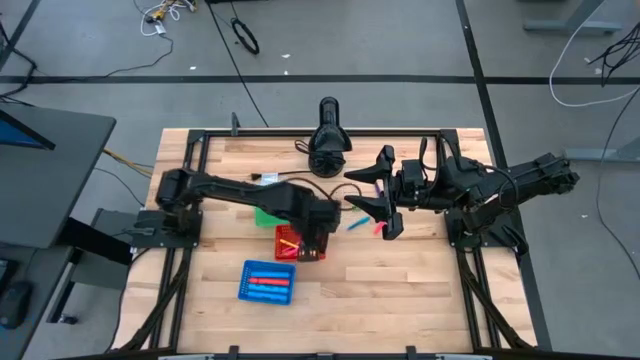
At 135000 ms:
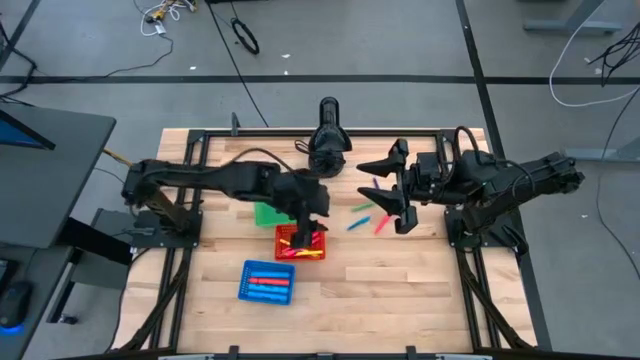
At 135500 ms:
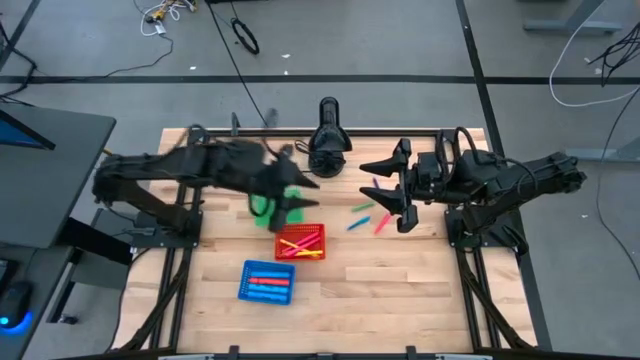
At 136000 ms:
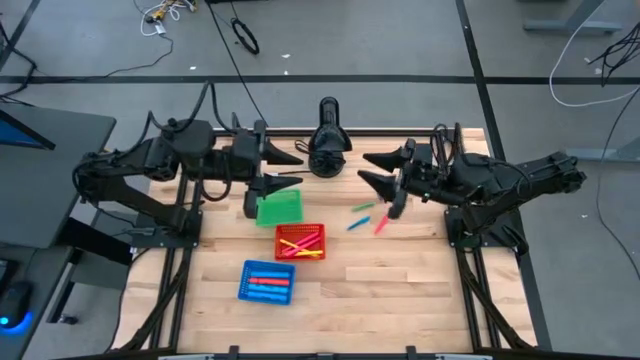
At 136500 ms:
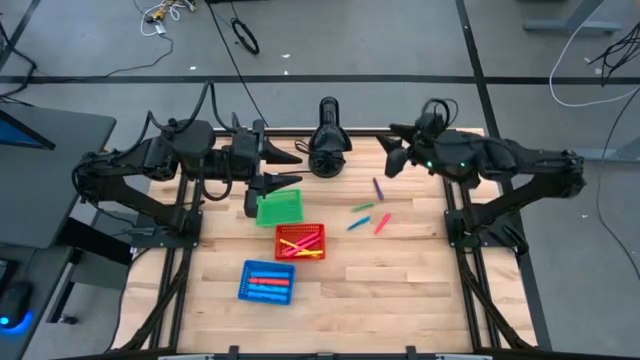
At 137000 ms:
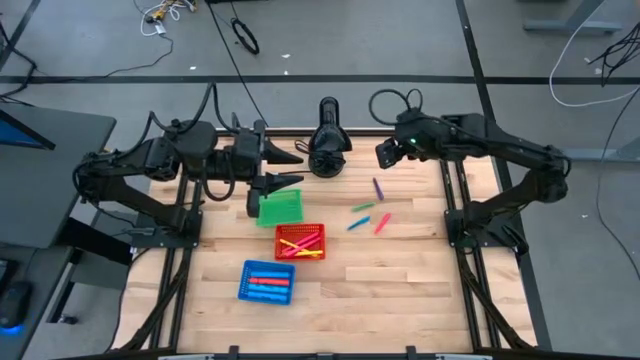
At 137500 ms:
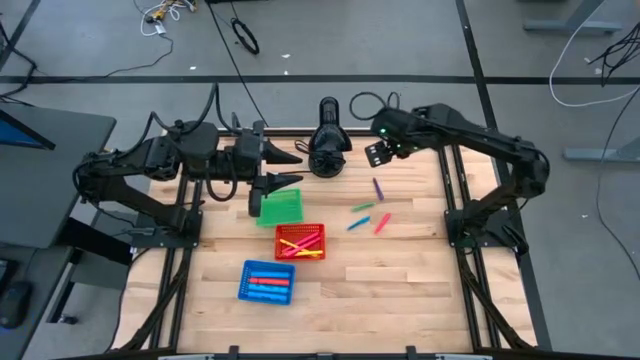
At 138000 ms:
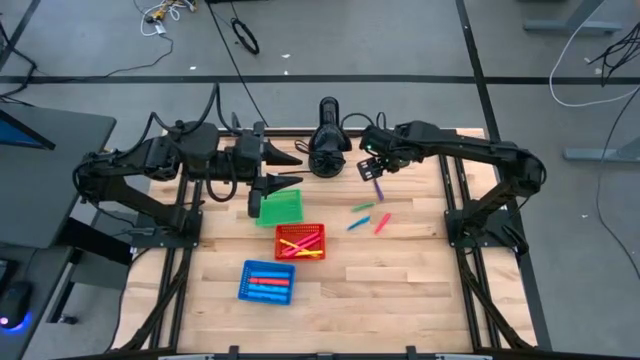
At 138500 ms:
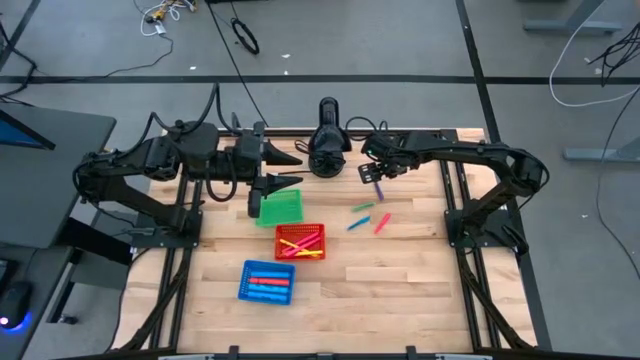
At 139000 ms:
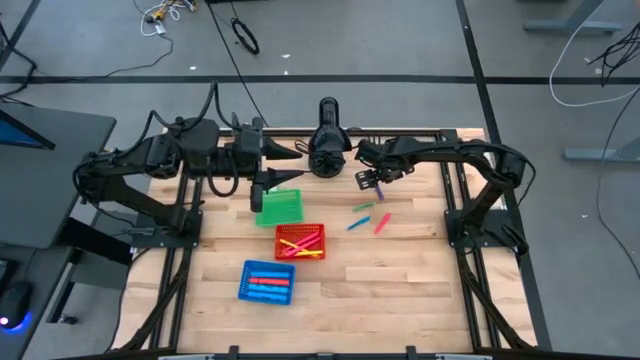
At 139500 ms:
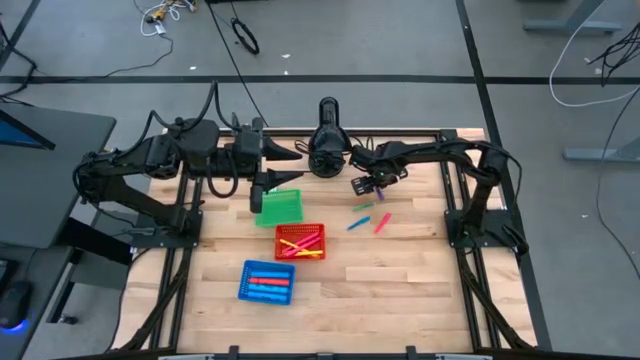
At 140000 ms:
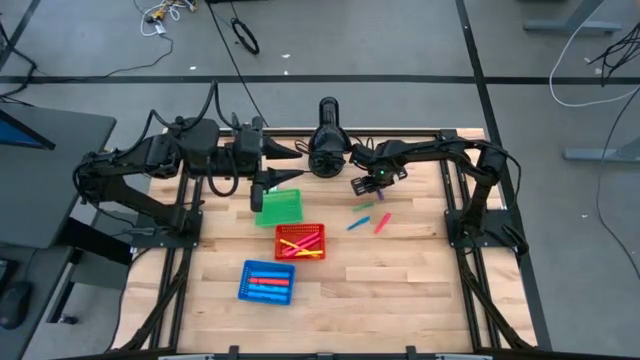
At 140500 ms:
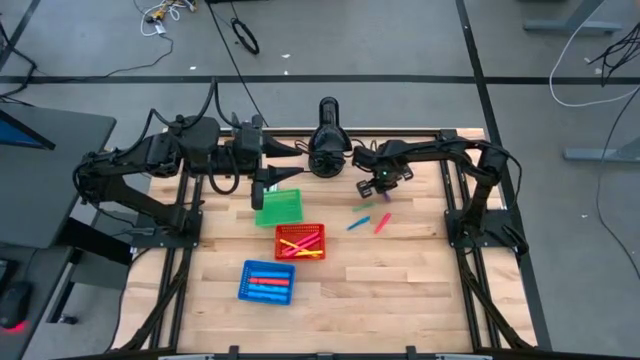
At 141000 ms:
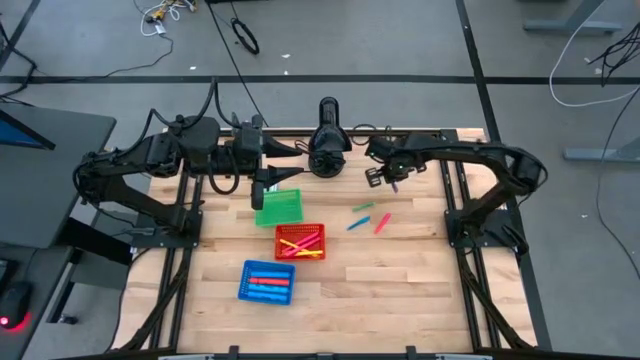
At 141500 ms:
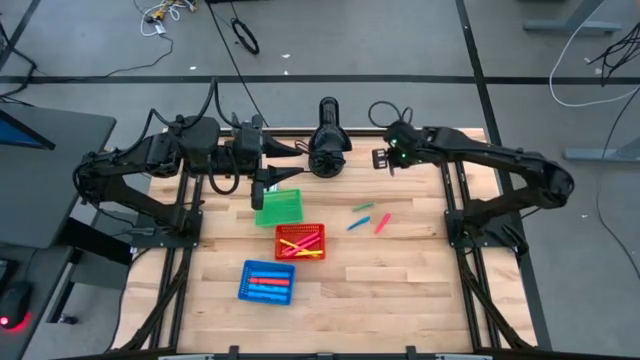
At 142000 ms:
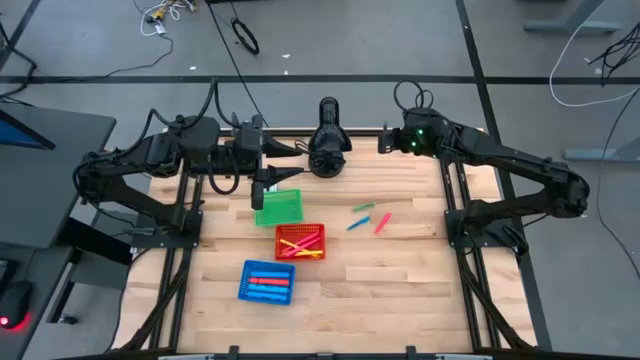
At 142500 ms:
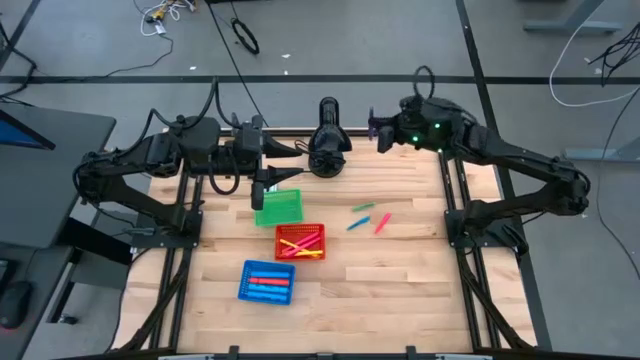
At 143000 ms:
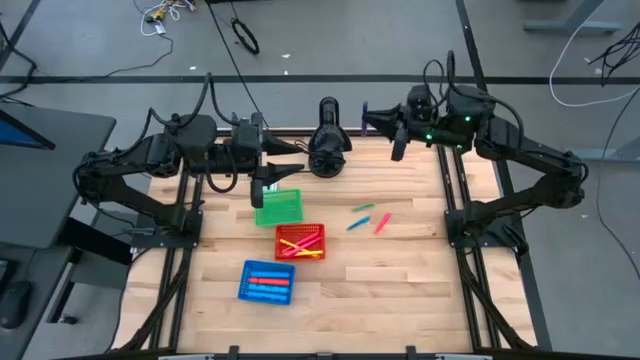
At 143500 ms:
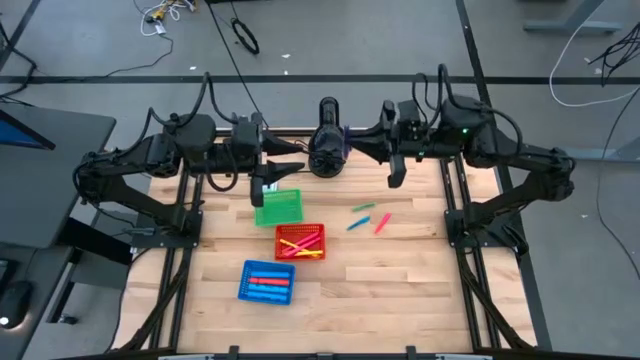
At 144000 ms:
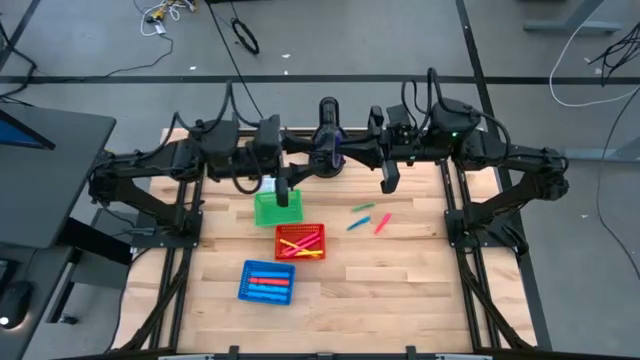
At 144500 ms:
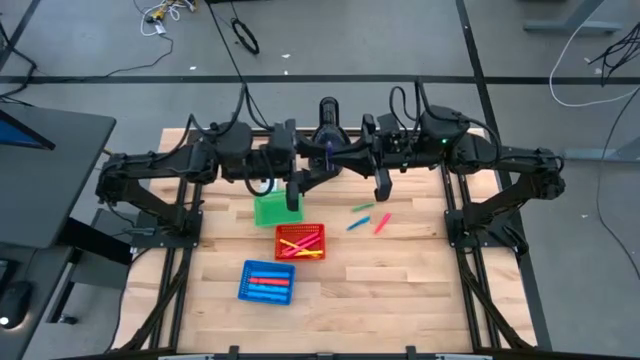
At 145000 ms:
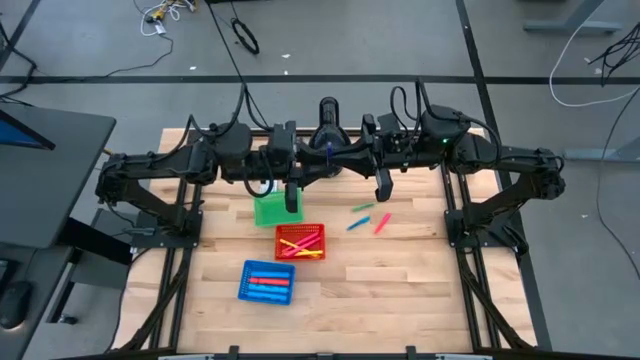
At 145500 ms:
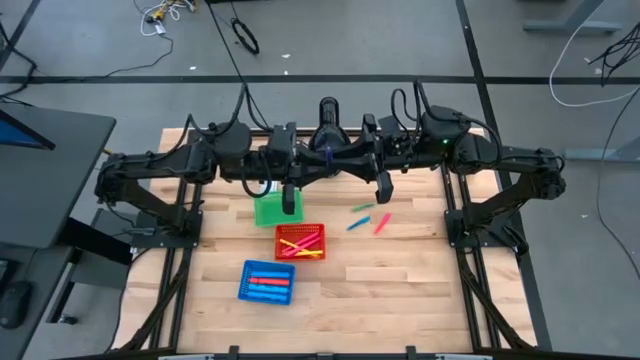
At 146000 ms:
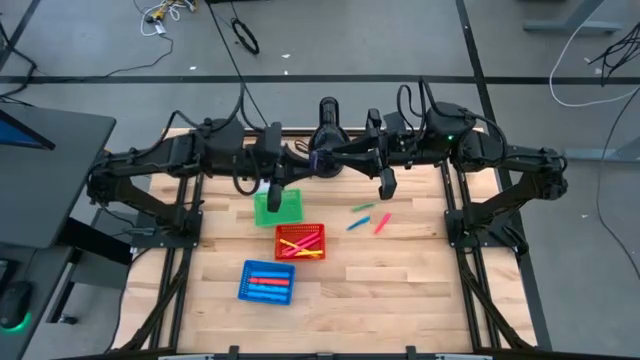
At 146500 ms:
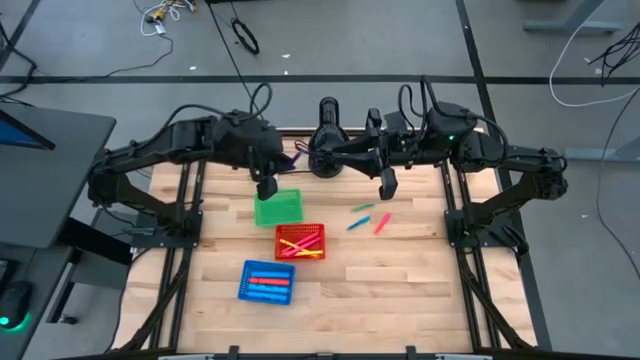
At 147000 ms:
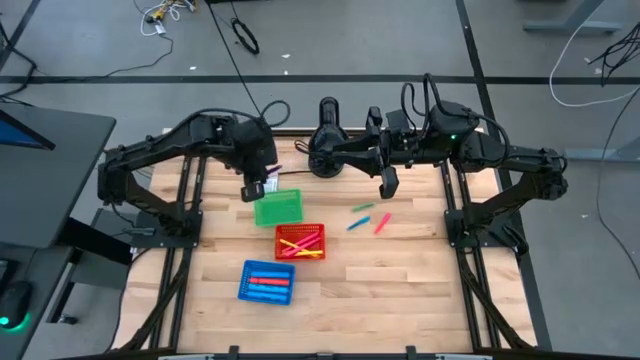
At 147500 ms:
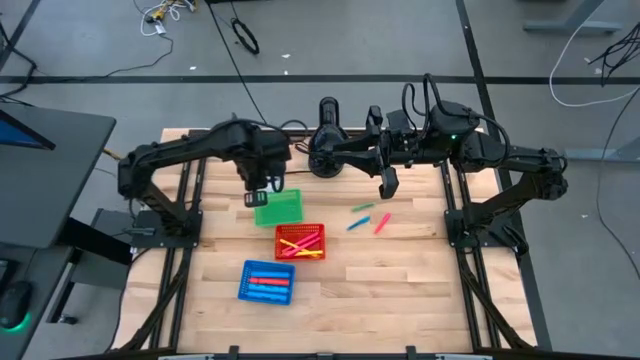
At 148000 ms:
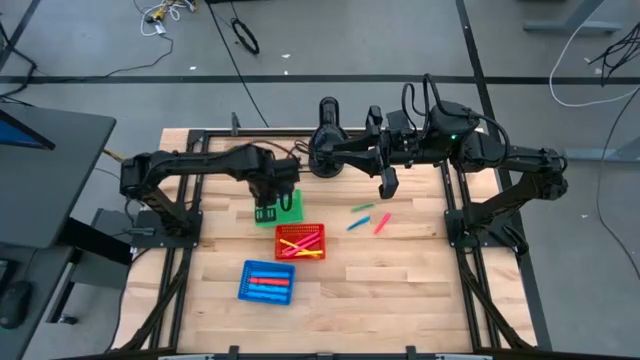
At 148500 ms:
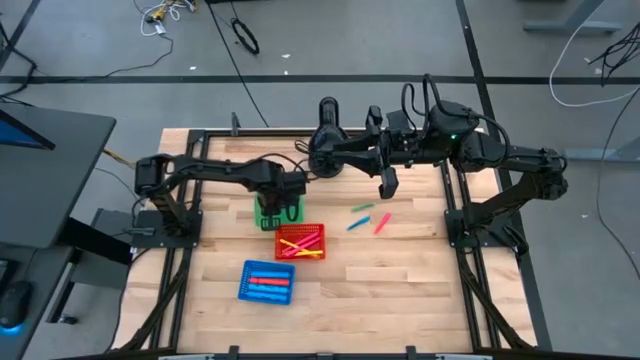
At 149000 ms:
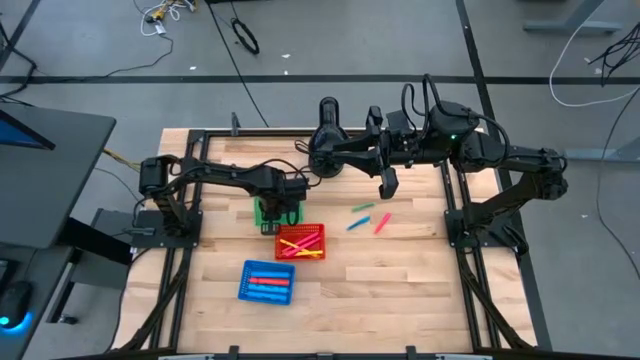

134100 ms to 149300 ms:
Task: Pick & Place Markers
Put the purple pen into the green bin

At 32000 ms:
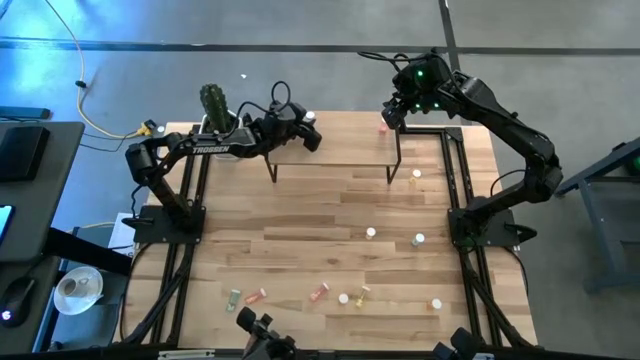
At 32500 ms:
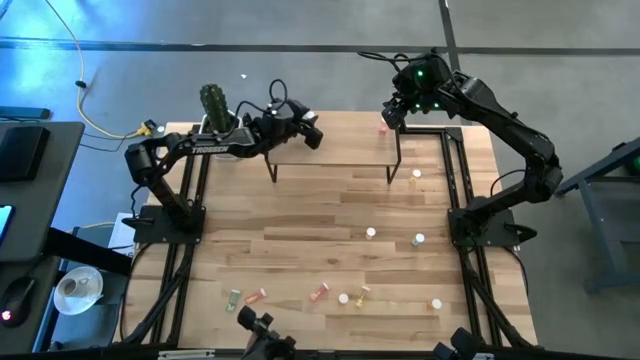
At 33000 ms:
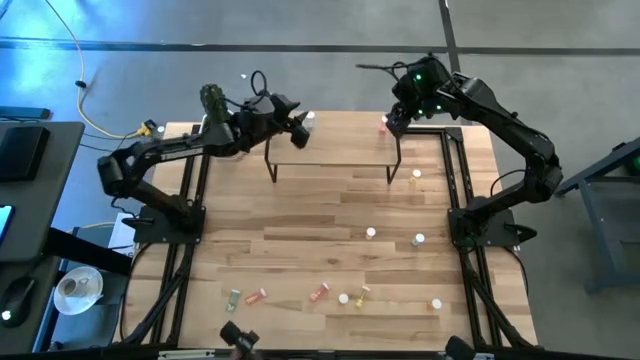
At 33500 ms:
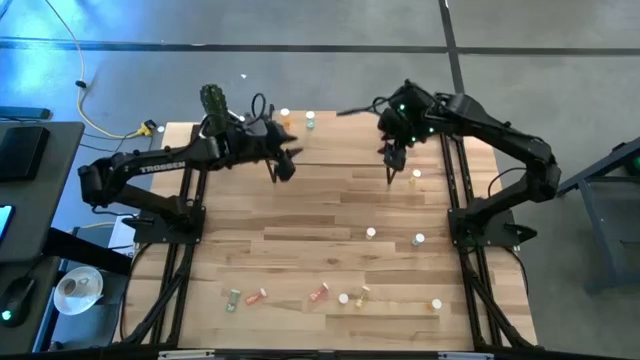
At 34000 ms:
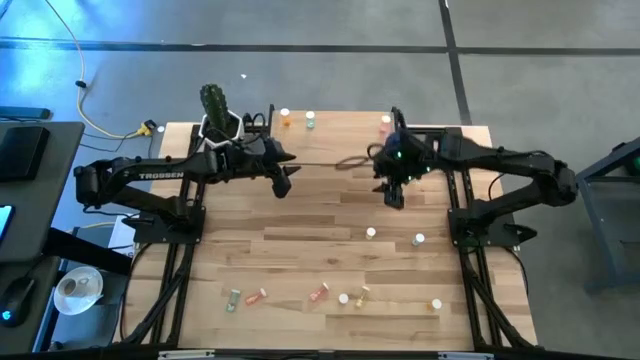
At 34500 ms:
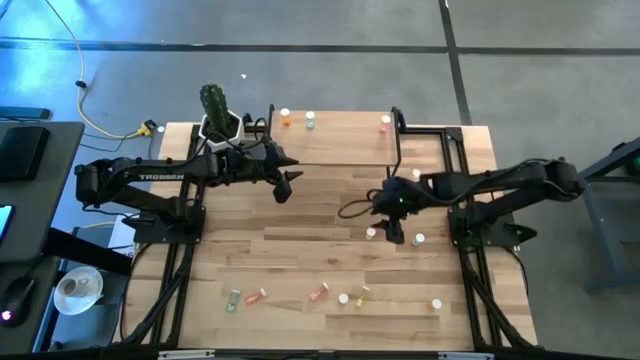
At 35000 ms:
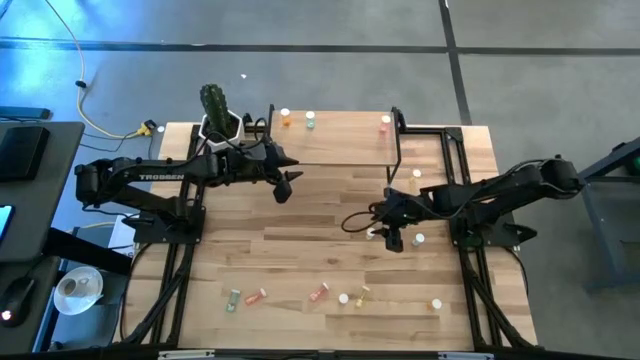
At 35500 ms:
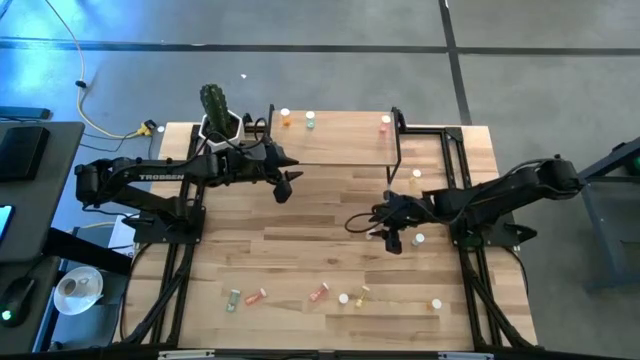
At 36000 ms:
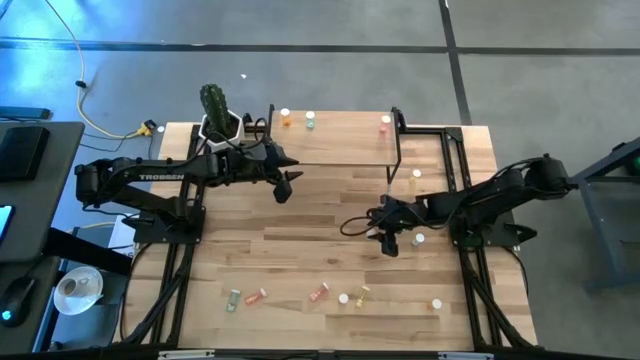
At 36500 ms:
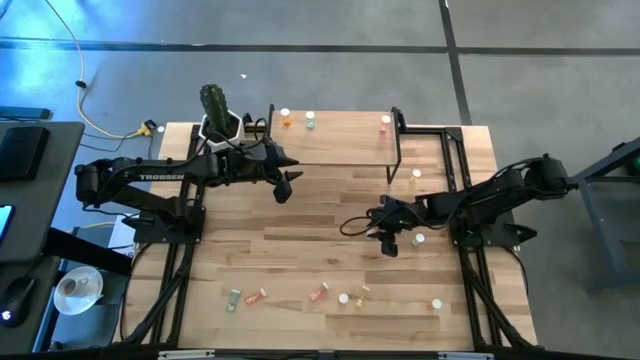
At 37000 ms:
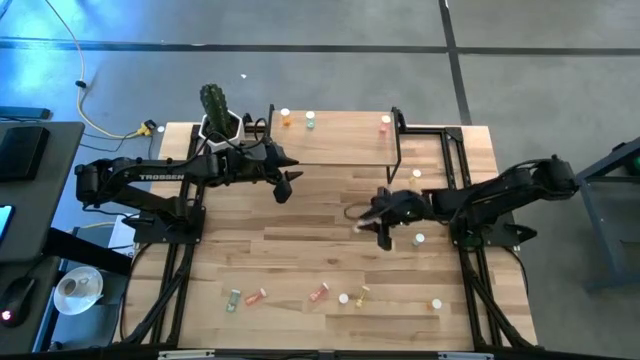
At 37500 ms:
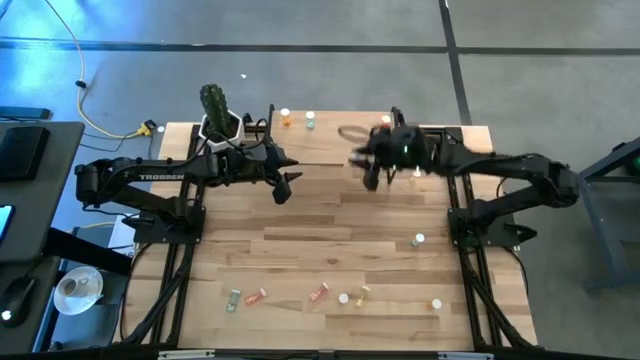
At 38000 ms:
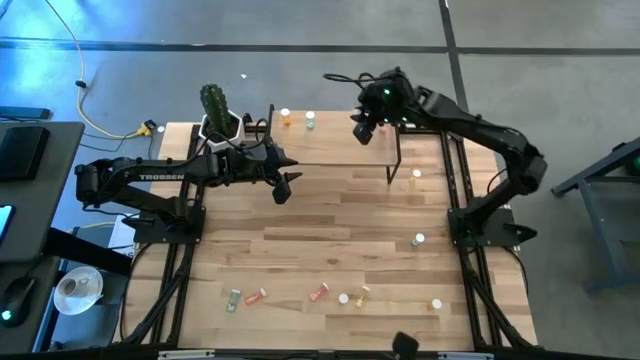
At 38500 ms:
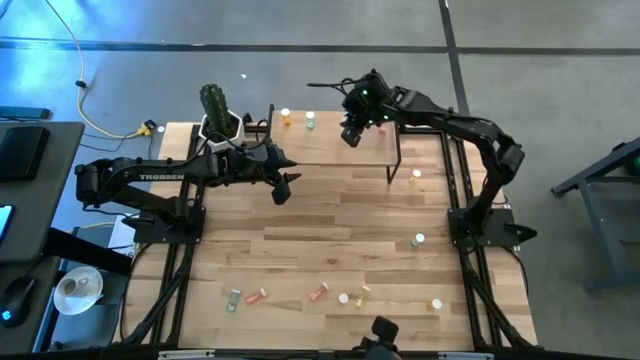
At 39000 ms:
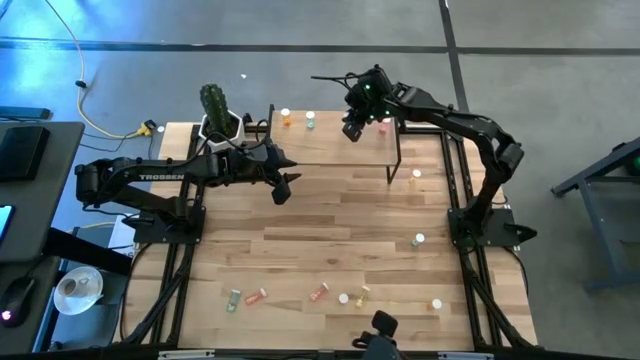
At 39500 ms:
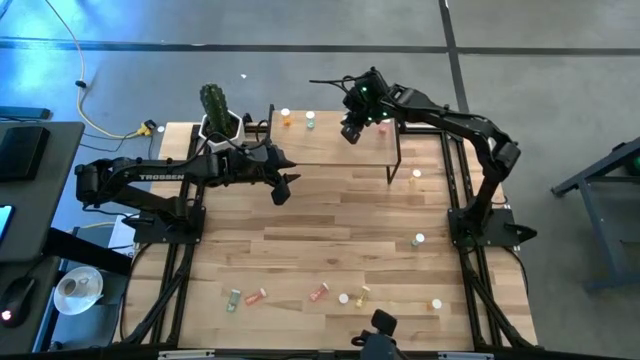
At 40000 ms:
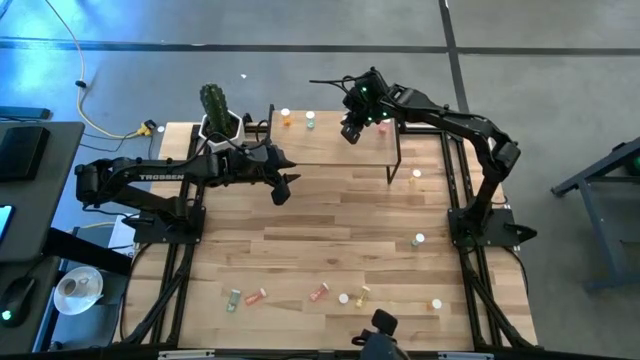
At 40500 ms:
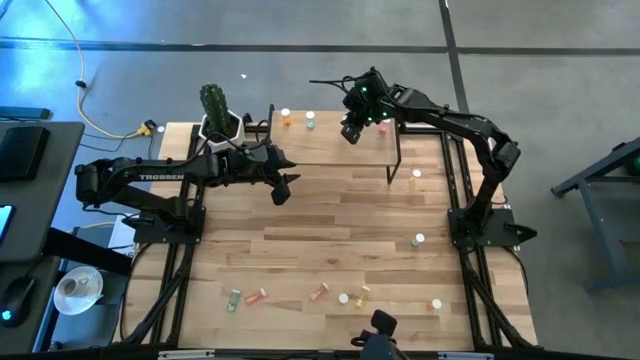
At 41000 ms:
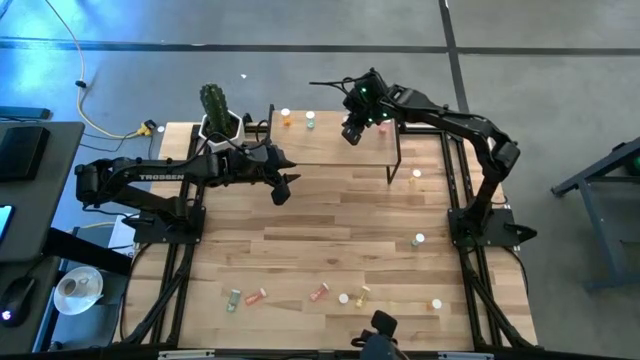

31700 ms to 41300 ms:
Task: Pick and place medicine bottles onto shelf by color
Put the middle yellow pill bottle on the shelf
